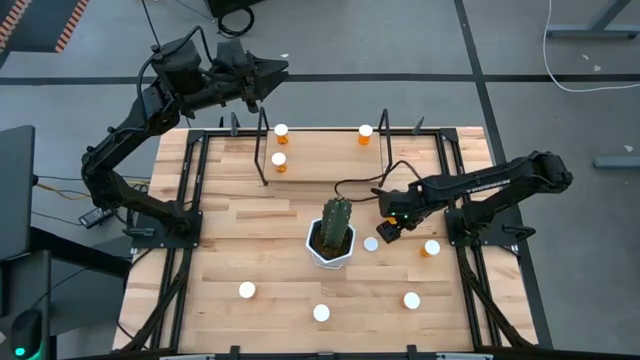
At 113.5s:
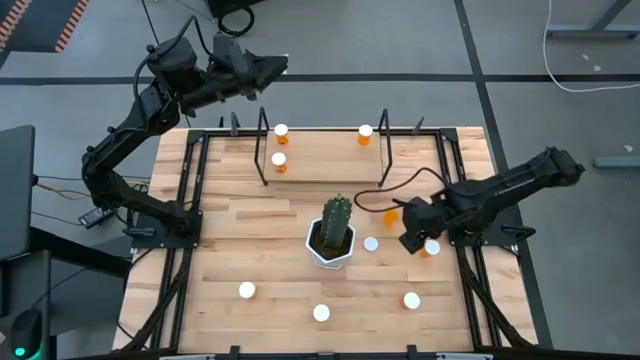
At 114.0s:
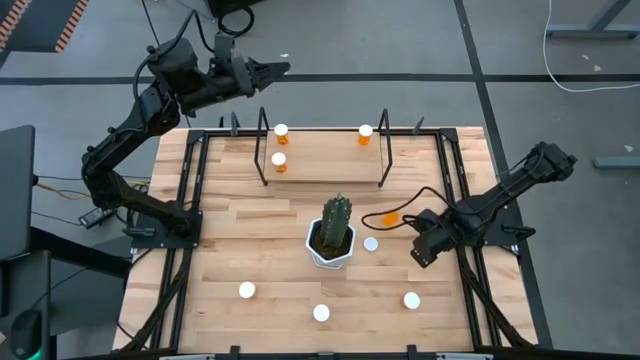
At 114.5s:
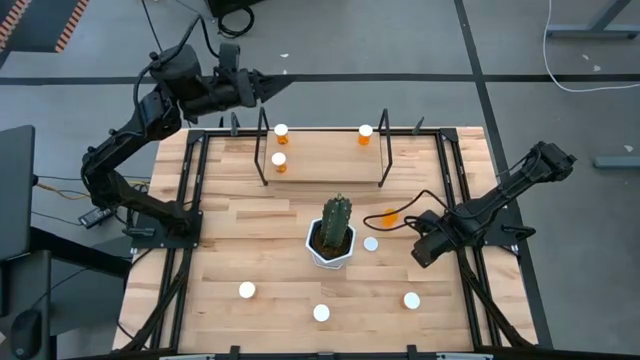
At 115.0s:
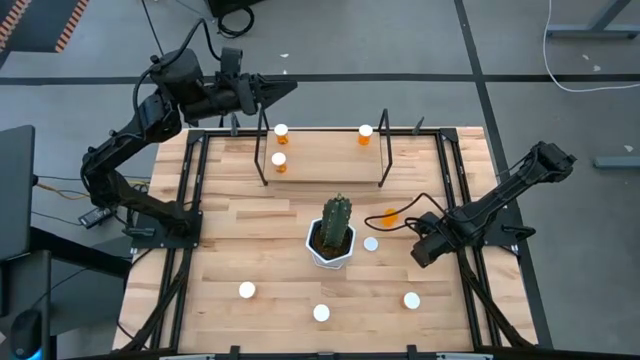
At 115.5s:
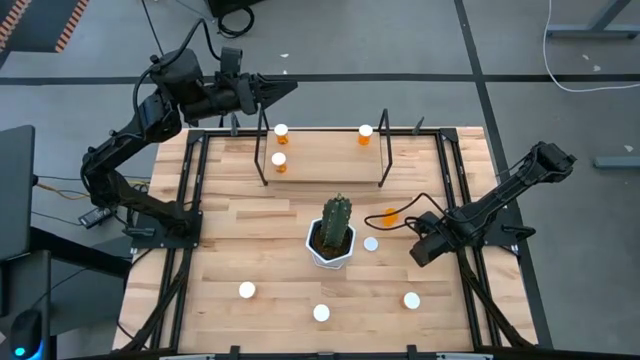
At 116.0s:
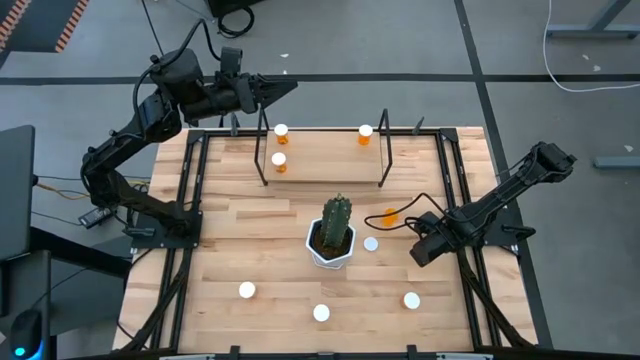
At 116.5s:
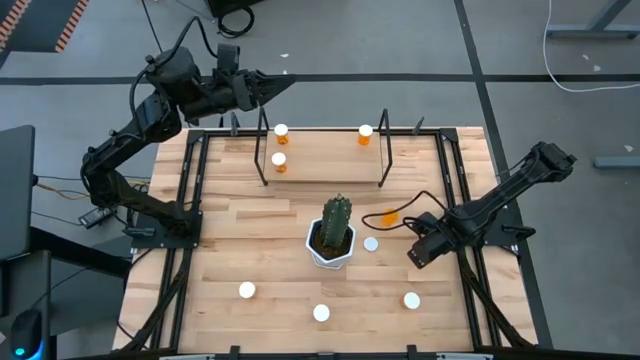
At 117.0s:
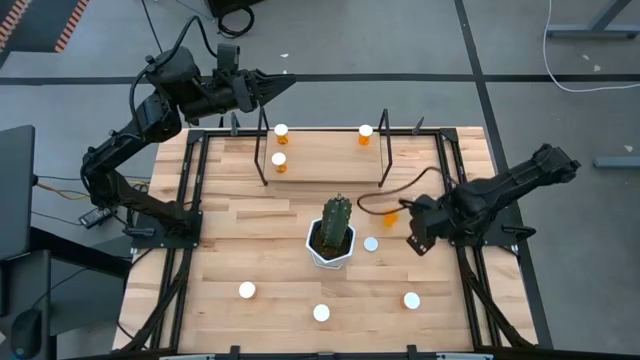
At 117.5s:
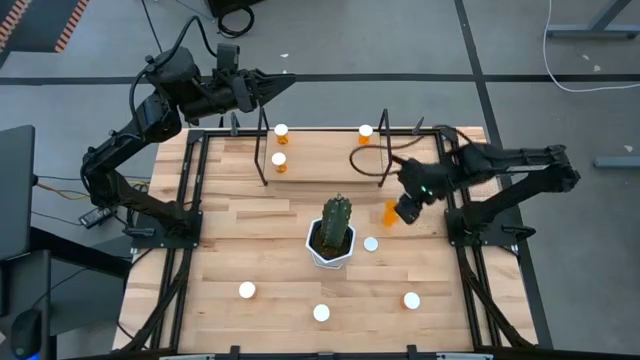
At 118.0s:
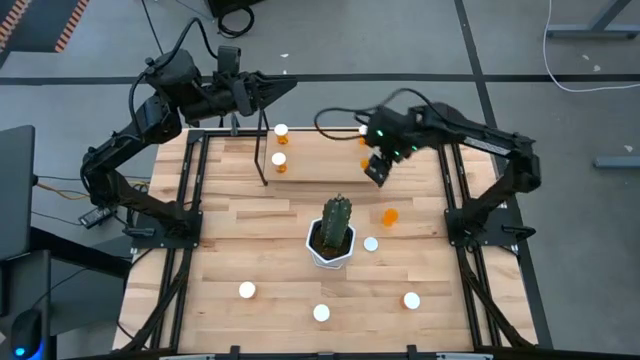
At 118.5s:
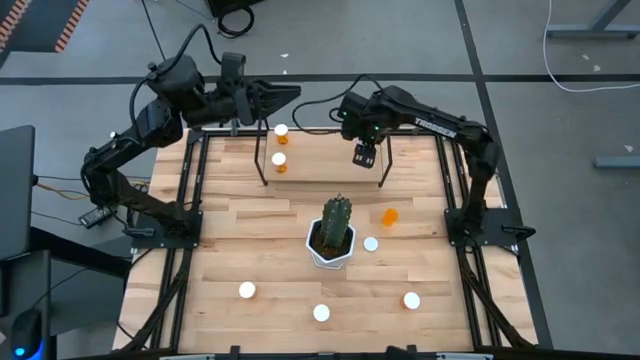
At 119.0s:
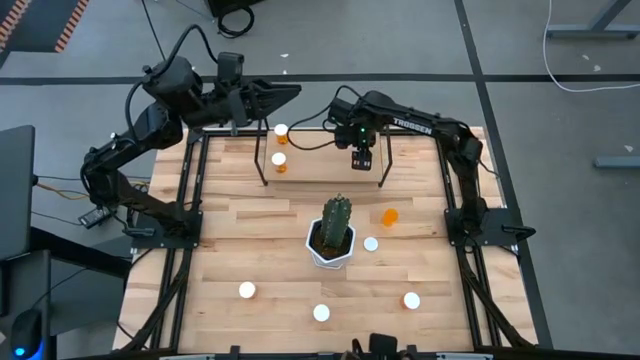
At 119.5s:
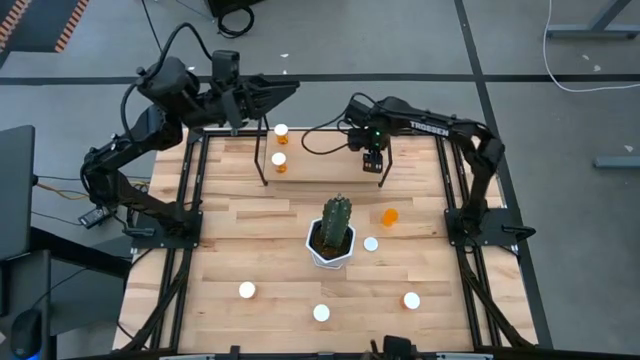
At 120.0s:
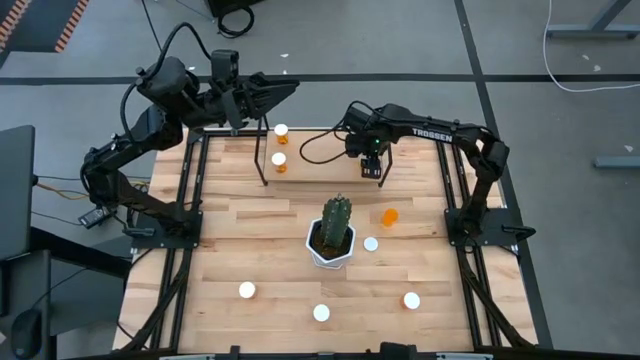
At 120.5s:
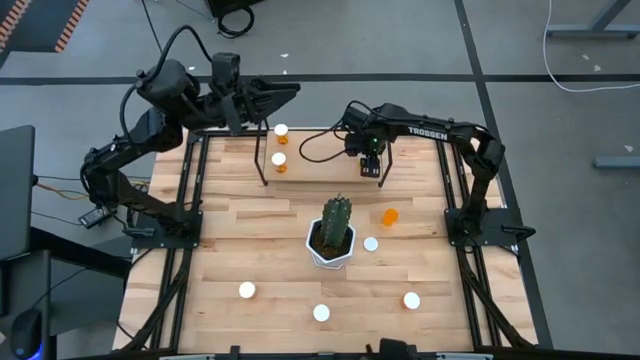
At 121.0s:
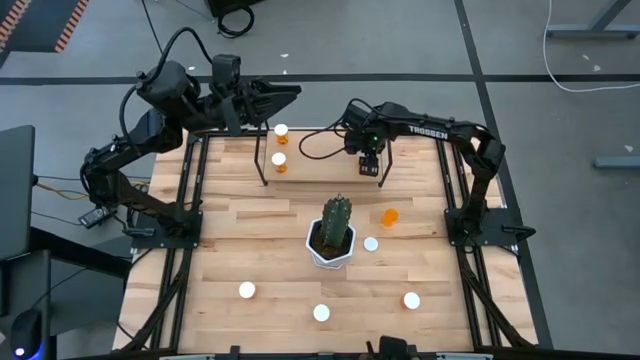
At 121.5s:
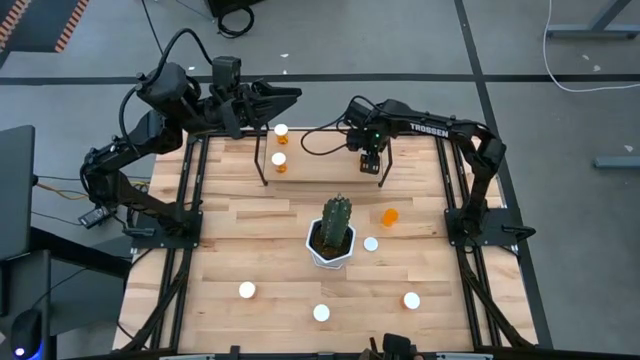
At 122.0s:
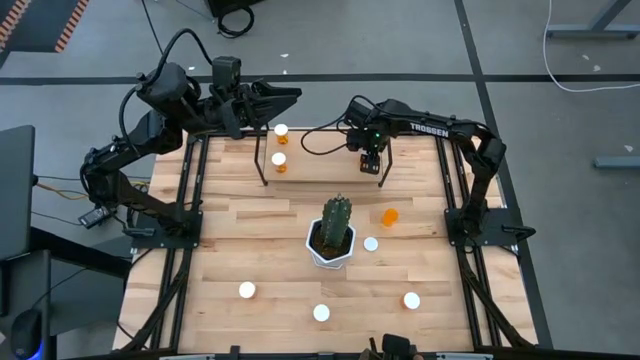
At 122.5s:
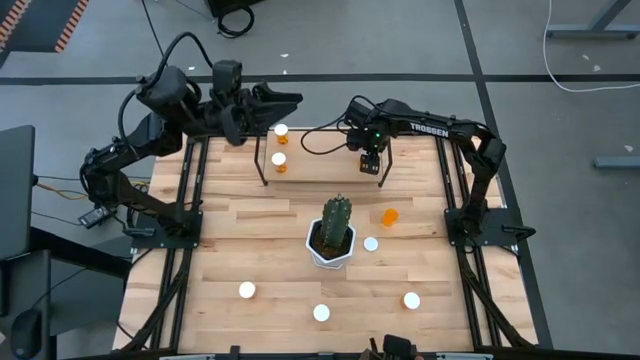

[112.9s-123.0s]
Task: Pick and place medicine bottles onto shelf by color
Put the orange medicine bottle on the shelf

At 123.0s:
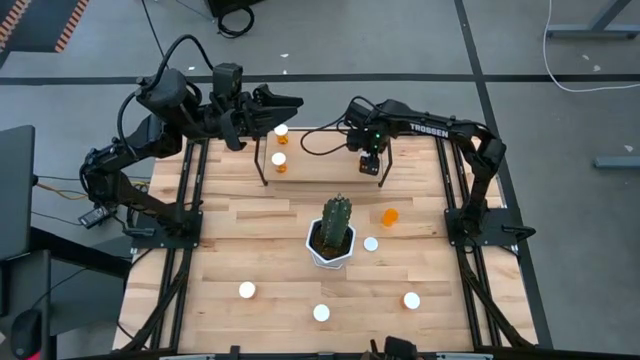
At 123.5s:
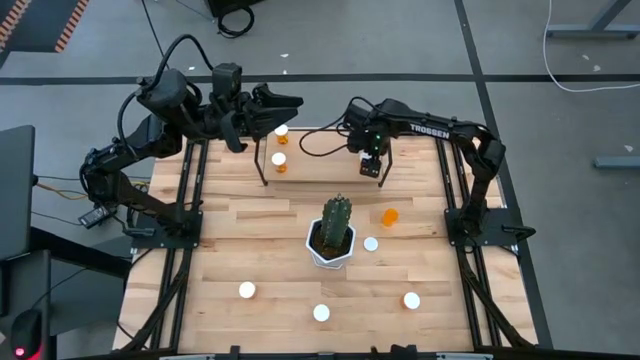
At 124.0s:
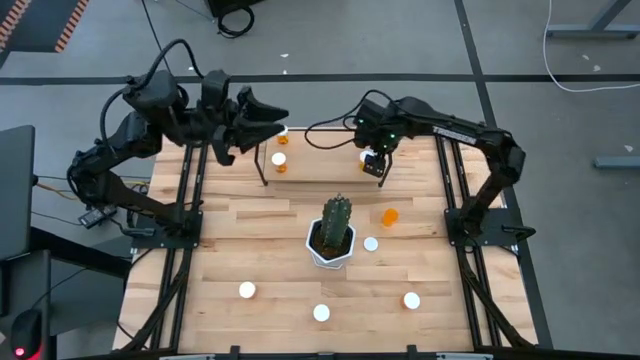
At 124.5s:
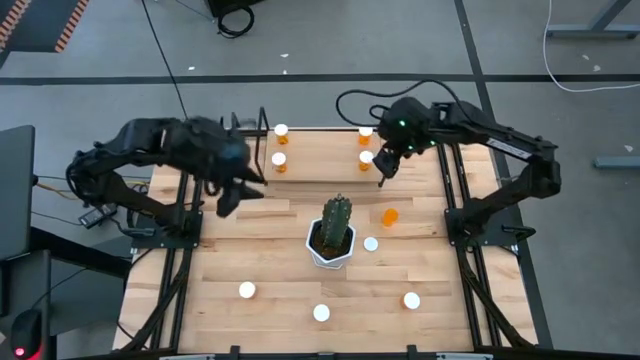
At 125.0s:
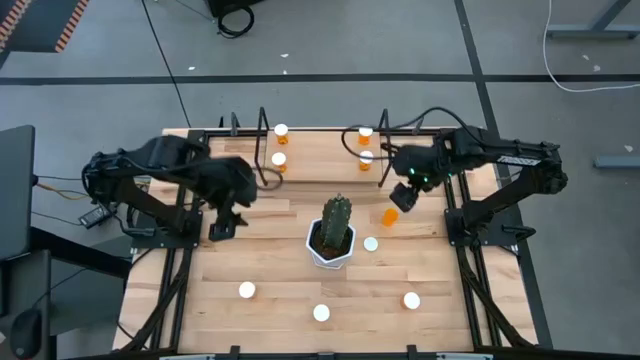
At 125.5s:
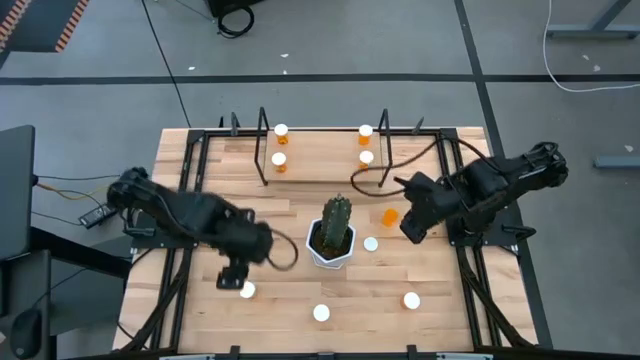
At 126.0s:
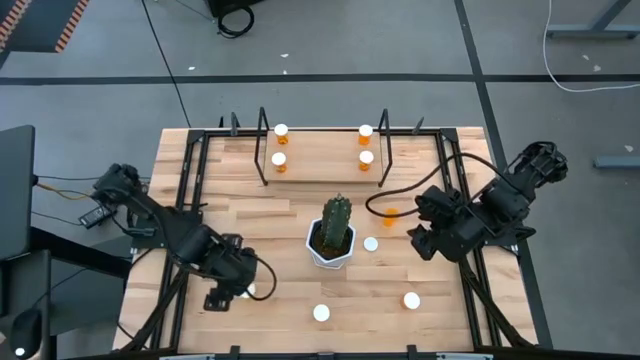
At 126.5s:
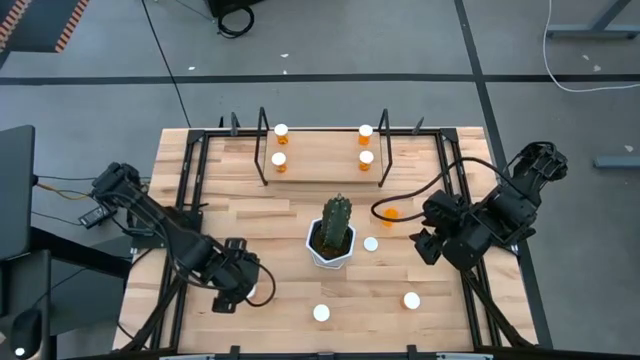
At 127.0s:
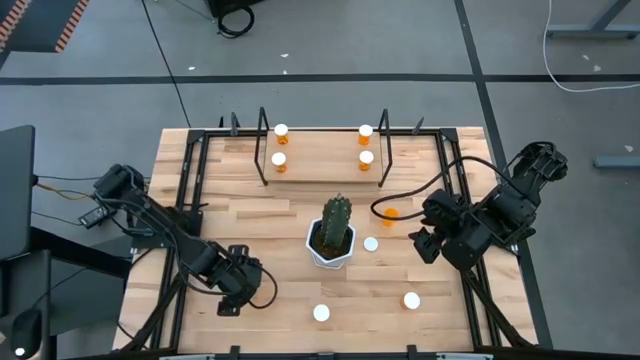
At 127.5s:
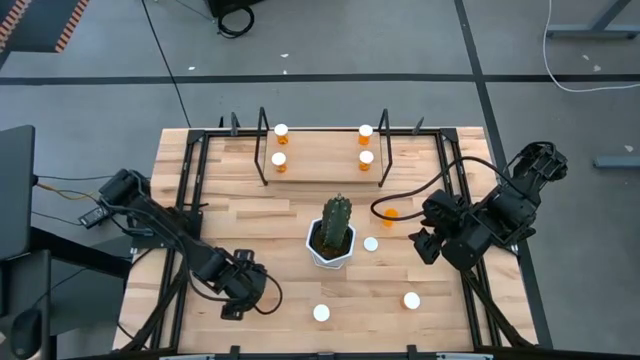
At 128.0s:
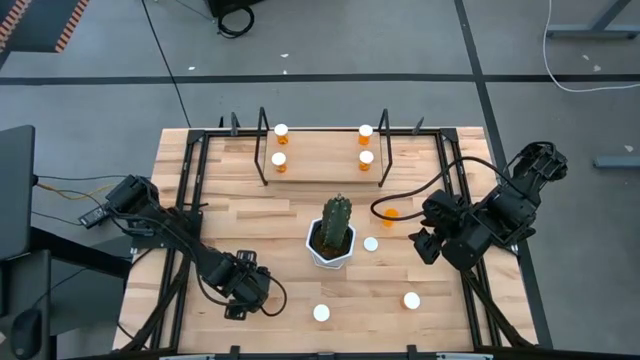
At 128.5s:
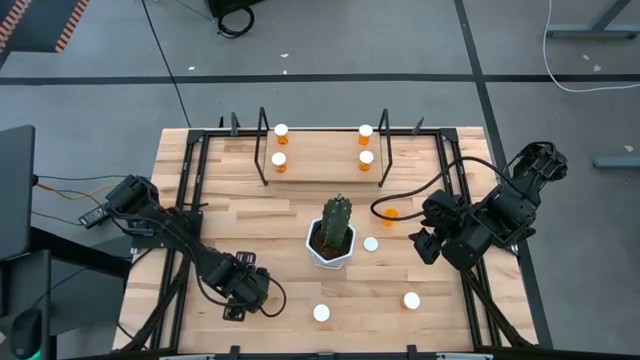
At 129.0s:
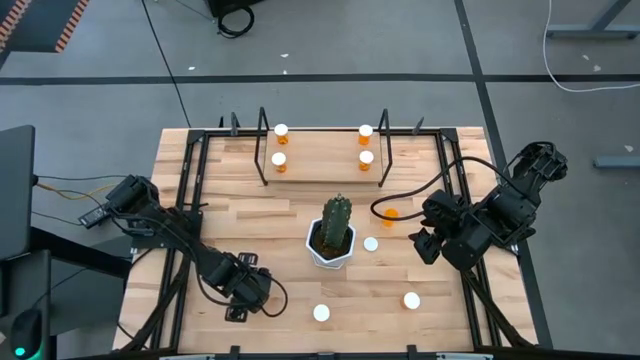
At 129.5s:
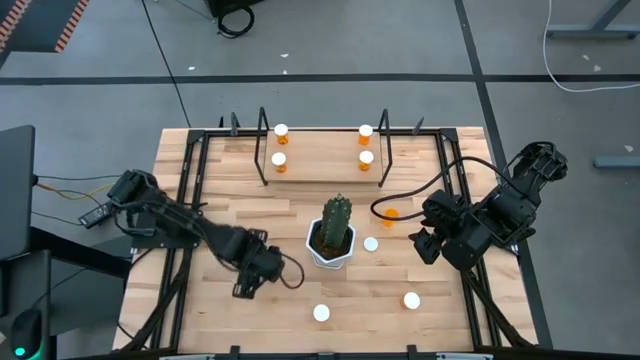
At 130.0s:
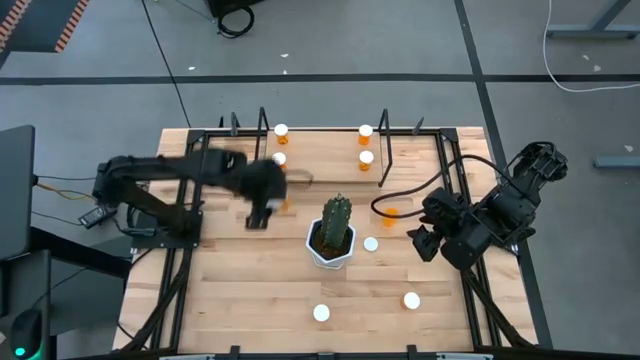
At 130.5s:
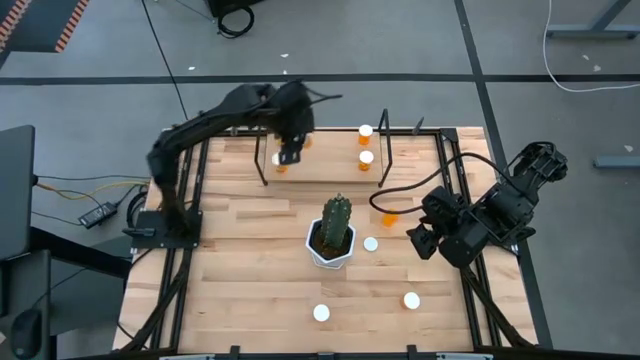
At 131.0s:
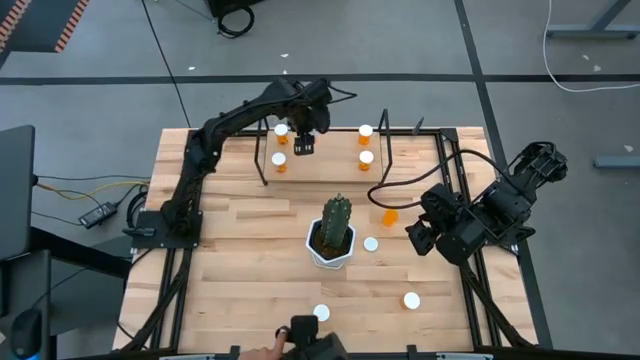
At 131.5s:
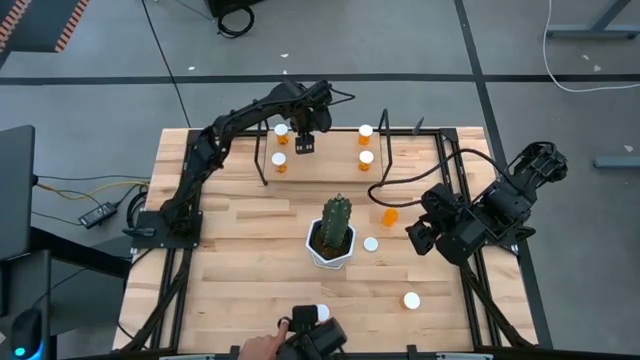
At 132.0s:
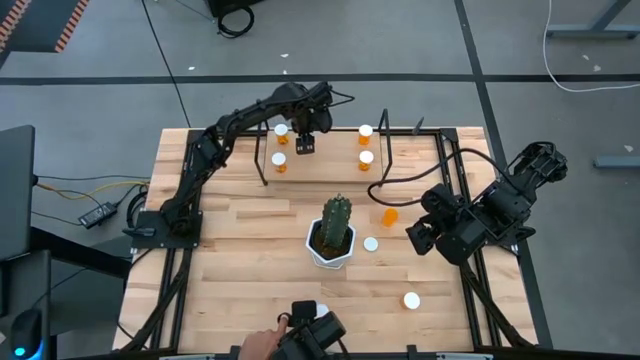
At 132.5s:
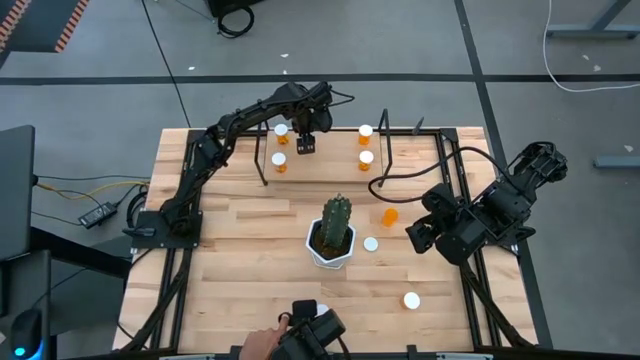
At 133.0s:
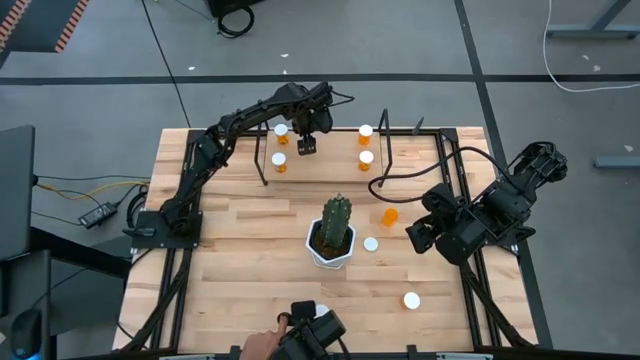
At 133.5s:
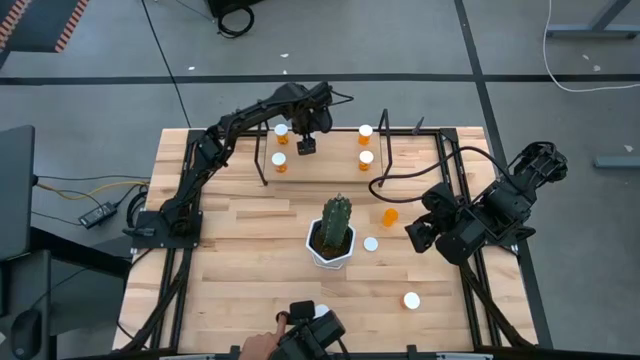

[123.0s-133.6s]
Put the orange medicine bottle on the shelf

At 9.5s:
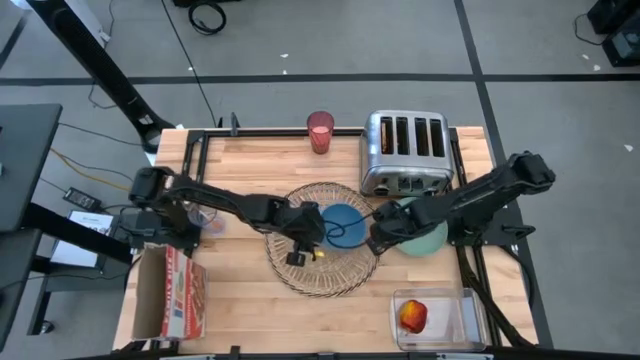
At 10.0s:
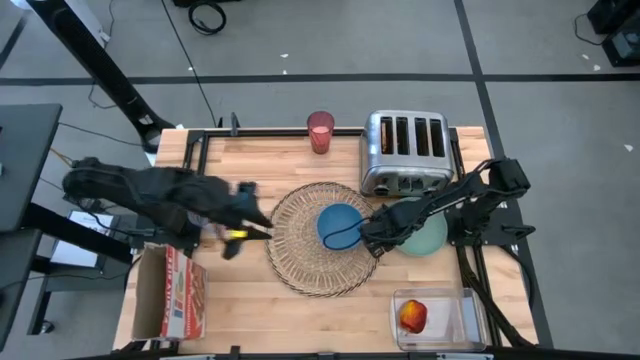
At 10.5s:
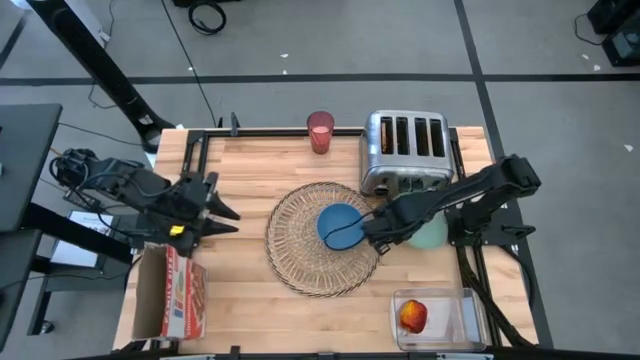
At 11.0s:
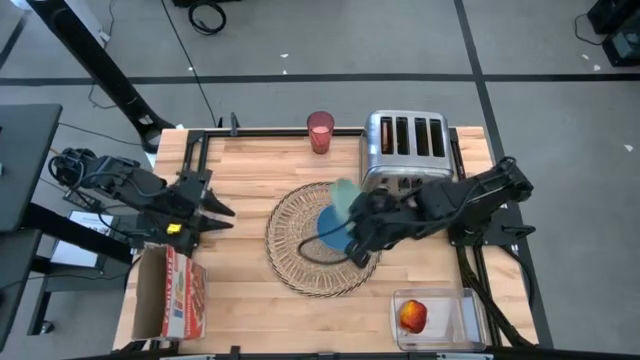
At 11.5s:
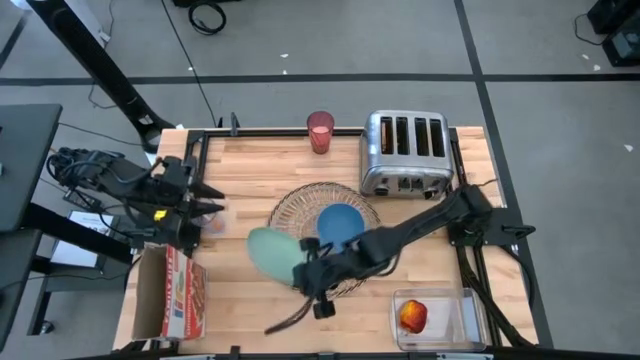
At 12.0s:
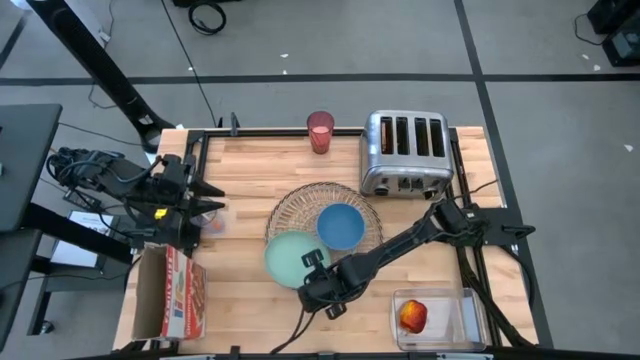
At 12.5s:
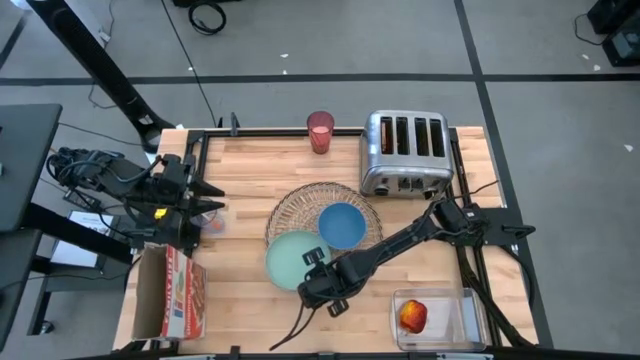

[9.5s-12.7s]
Task: Arrange a breakfast setting
Put the green plate on the placemat to the bottom left of the blue bowl
